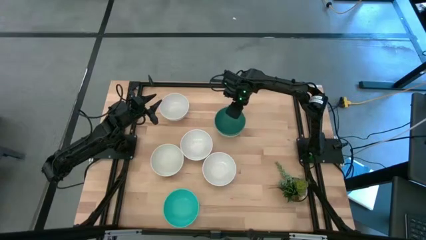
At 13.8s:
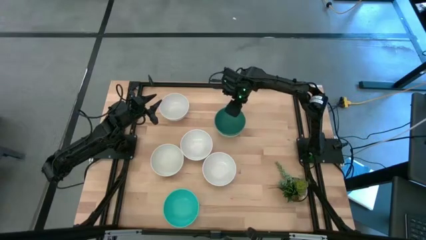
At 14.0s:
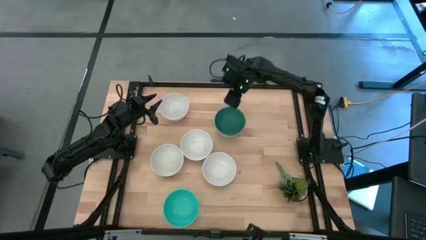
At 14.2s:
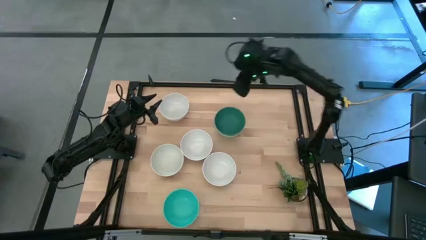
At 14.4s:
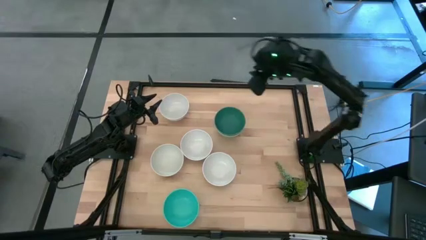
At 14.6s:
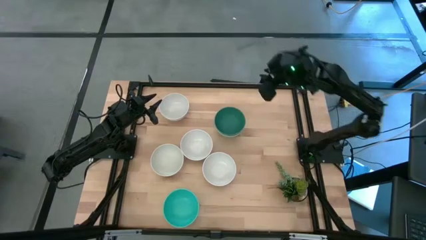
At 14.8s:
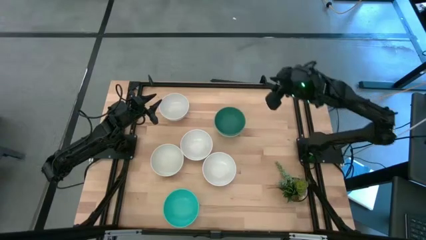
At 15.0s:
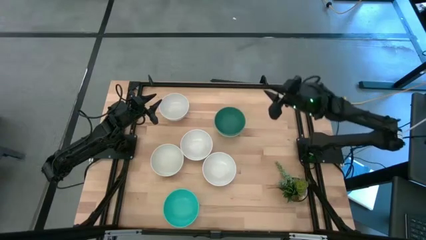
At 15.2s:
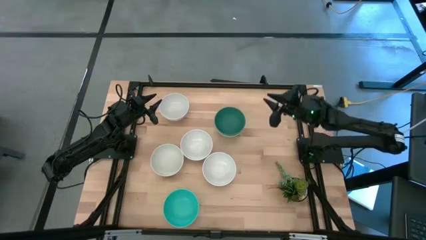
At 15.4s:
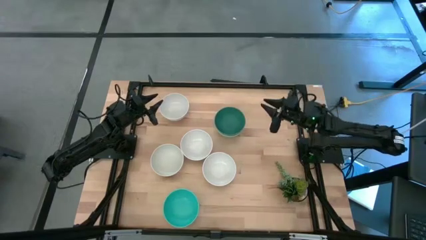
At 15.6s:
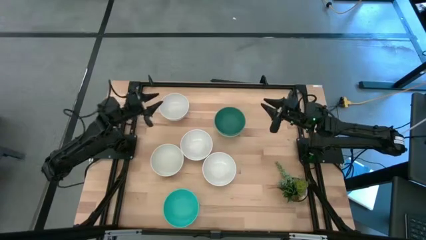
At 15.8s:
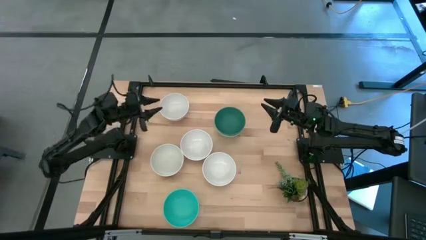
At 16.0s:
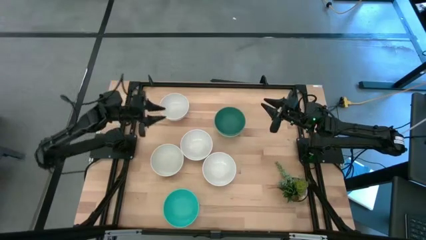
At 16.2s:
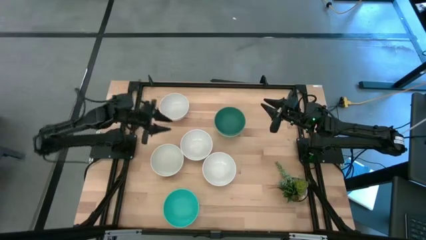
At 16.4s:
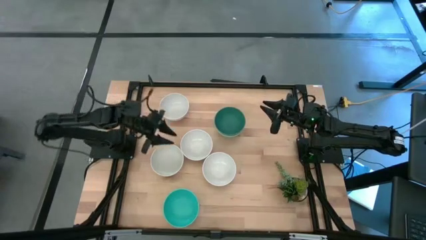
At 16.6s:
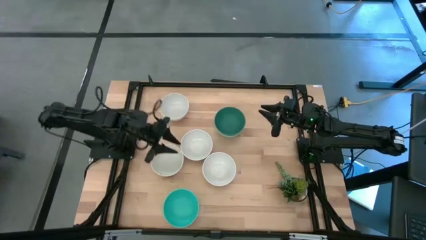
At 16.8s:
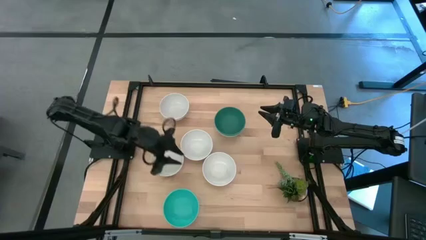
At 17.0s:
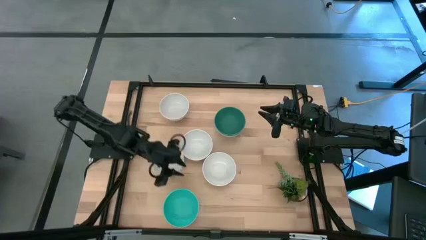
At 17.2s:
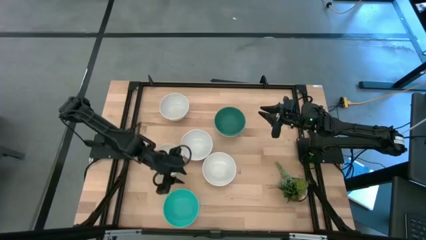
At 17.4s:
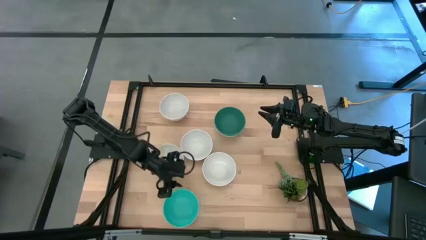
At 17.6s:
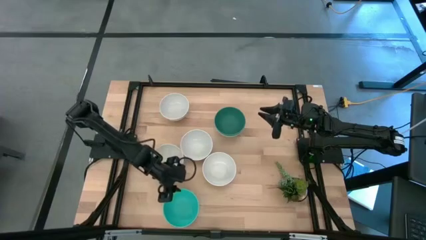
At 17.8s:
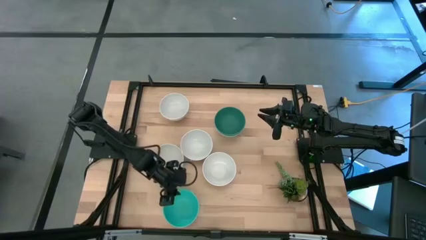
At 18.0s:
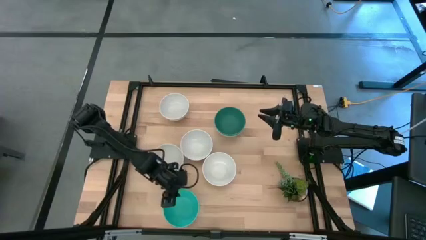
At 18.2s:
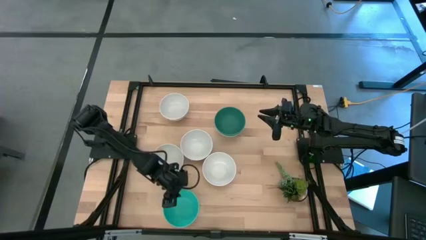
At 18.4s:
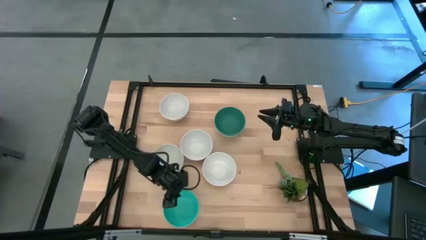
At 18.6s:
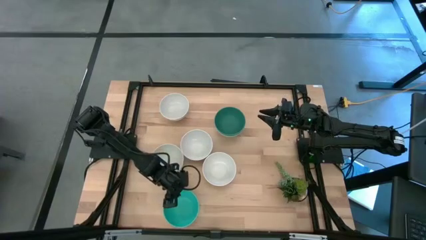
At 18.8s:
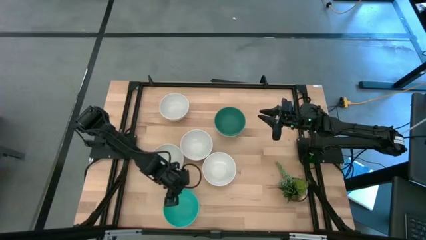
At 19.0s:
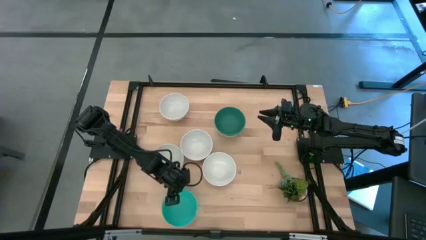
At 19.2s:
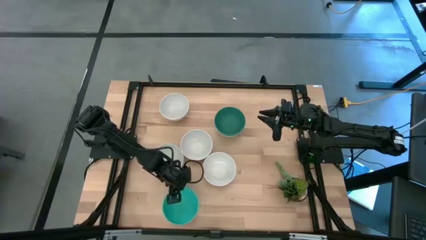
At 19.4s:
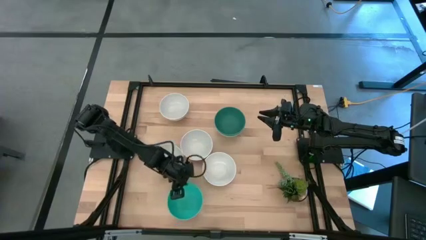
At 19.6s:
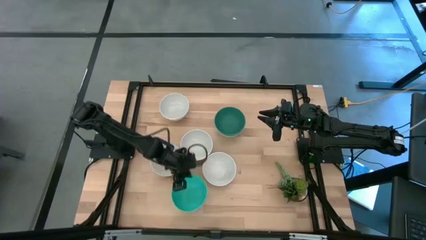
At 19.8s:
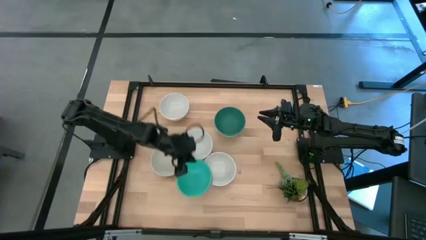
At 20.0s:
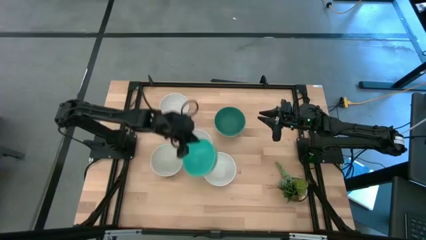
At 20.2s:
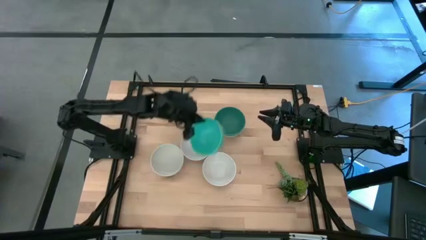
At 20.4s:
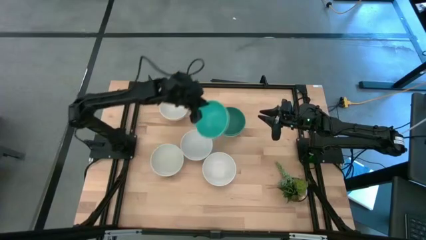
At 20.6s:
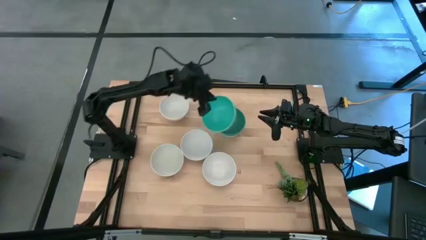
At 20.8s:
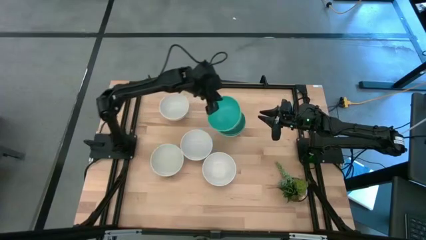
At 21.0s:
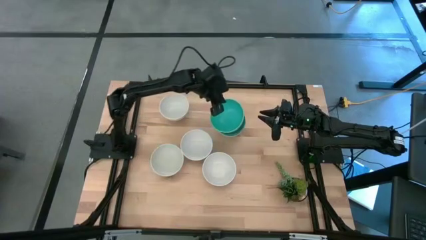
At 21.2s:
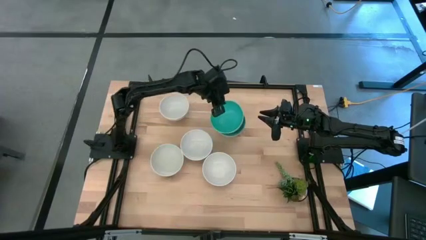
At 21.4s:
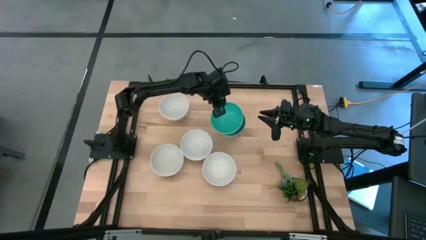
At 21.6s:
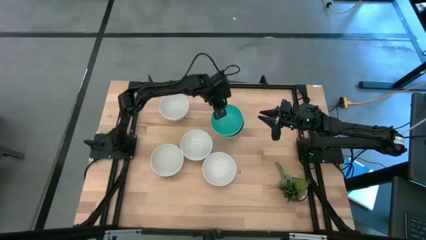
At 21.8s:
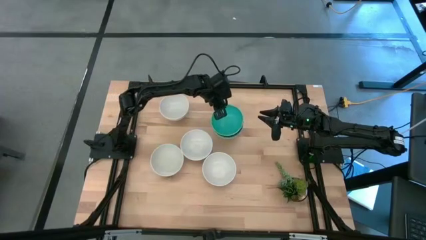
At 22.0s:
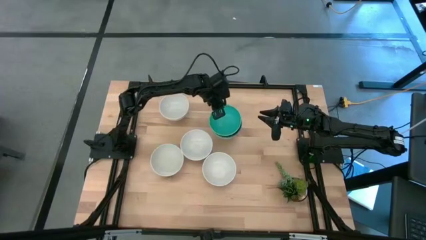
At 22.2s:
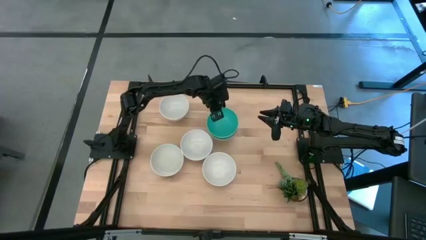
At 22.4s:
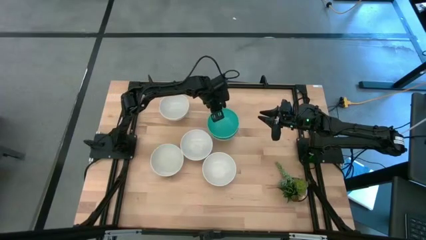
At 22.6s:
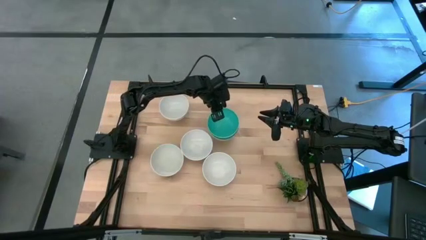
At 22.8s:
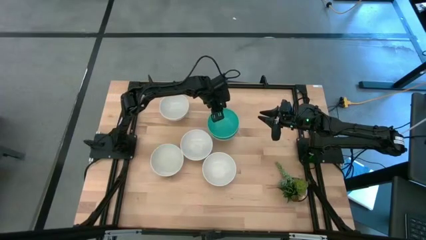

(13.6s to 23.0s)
Task: Nest bowls inside each other
Stack the blue bowl on the dark green bowl

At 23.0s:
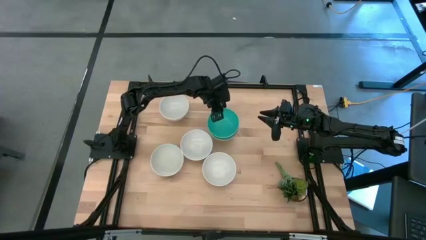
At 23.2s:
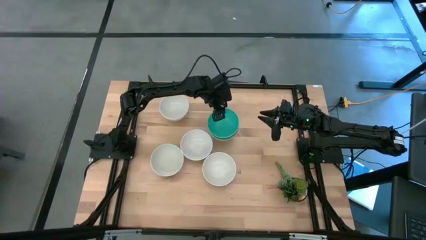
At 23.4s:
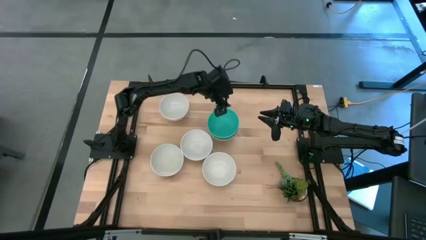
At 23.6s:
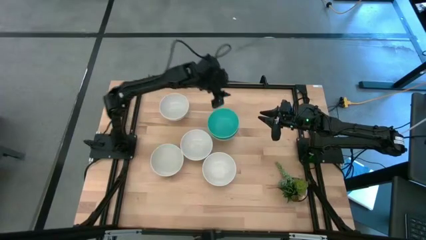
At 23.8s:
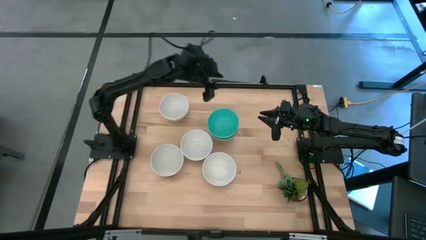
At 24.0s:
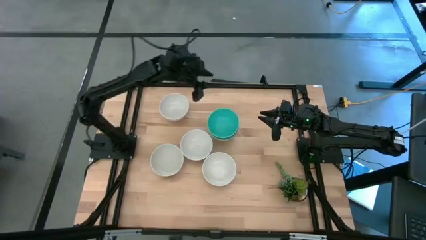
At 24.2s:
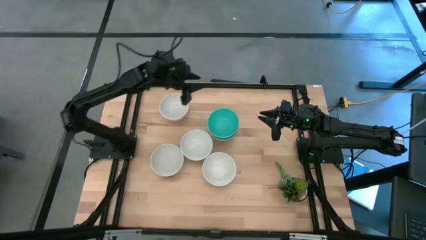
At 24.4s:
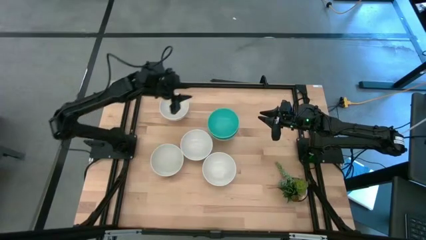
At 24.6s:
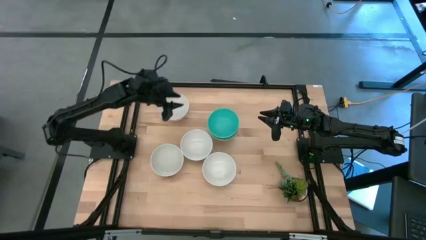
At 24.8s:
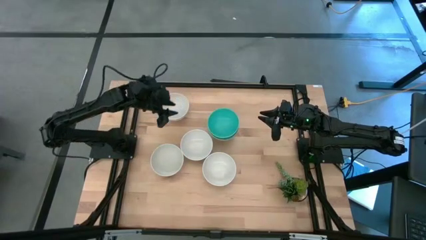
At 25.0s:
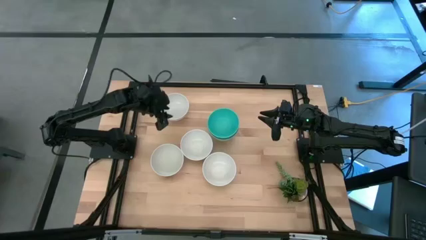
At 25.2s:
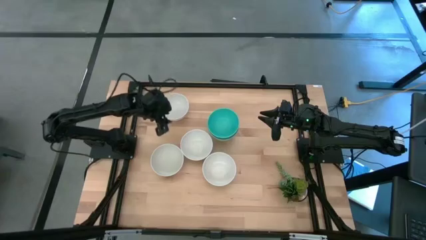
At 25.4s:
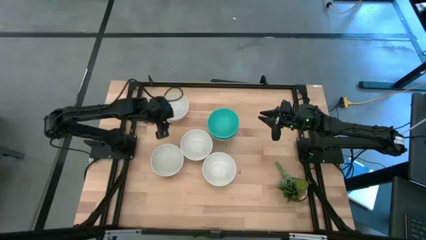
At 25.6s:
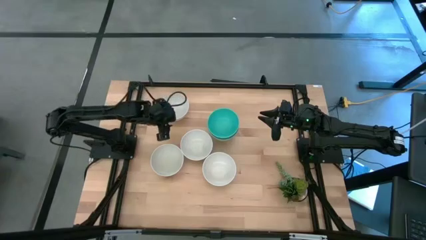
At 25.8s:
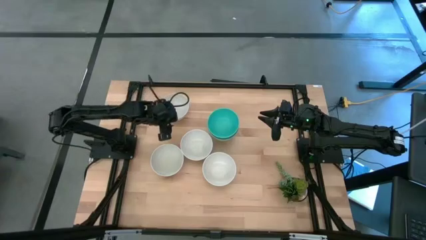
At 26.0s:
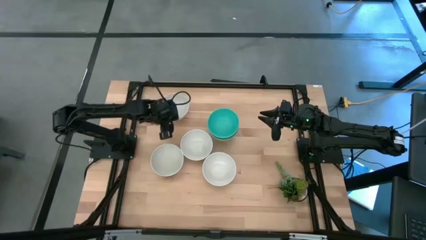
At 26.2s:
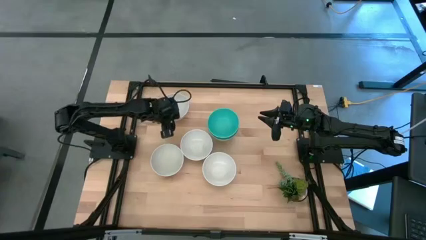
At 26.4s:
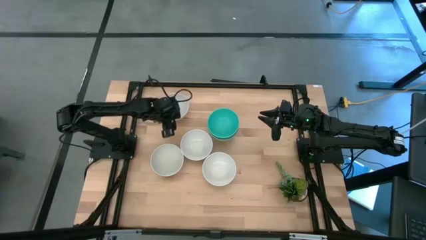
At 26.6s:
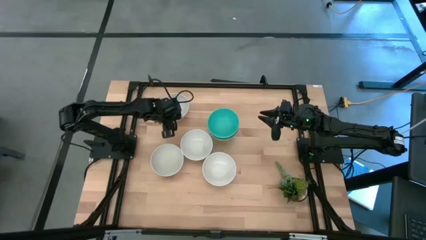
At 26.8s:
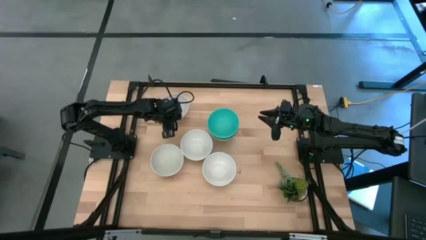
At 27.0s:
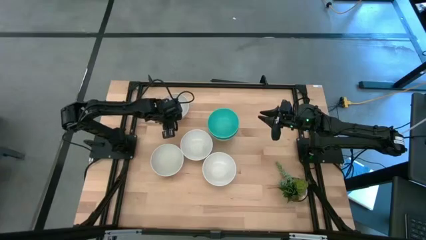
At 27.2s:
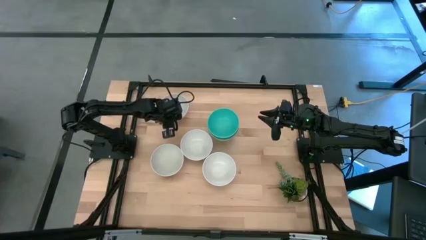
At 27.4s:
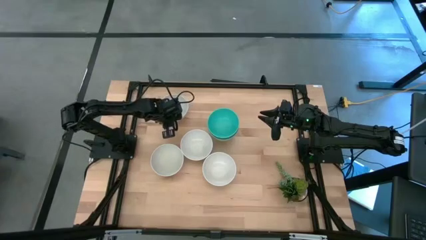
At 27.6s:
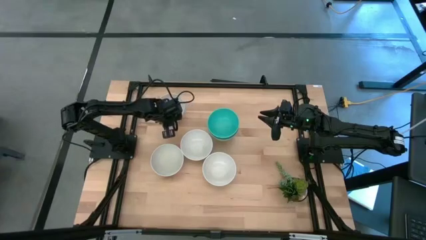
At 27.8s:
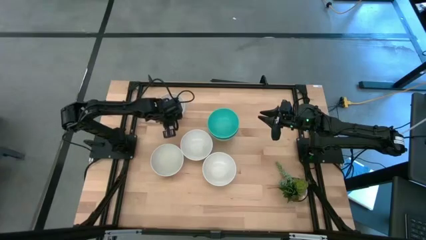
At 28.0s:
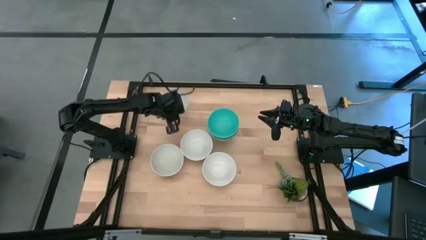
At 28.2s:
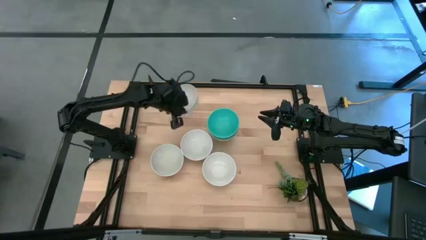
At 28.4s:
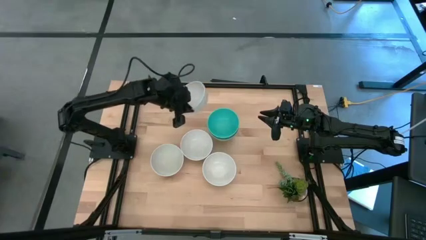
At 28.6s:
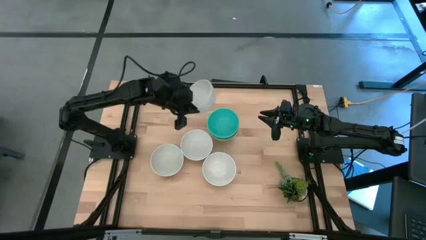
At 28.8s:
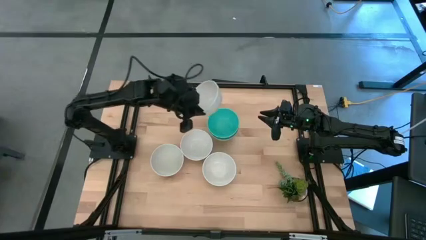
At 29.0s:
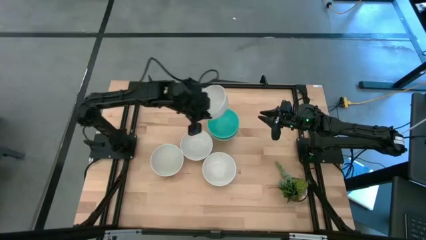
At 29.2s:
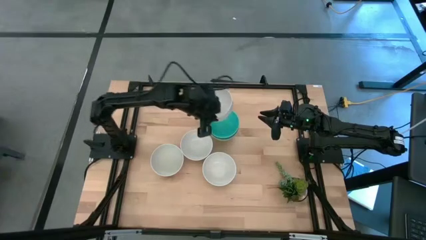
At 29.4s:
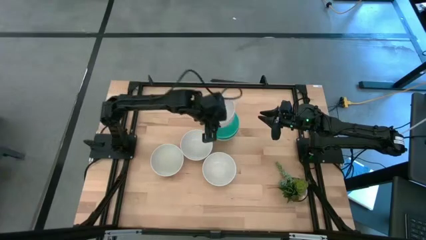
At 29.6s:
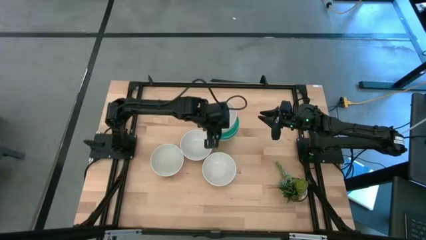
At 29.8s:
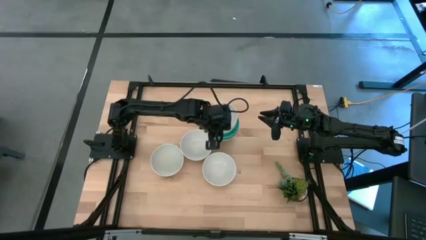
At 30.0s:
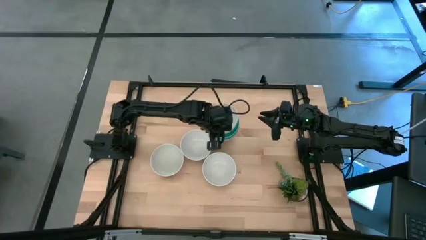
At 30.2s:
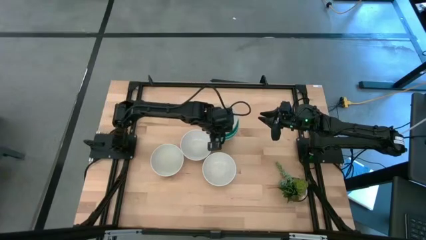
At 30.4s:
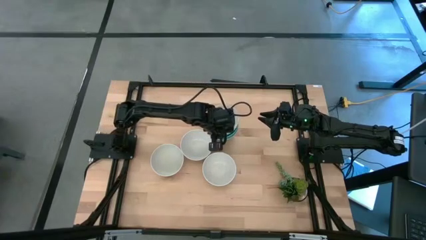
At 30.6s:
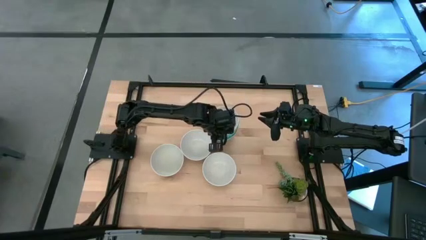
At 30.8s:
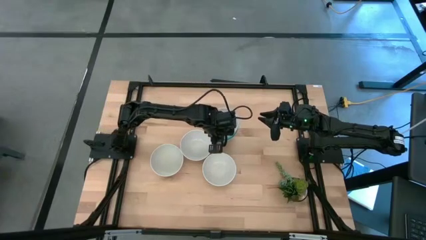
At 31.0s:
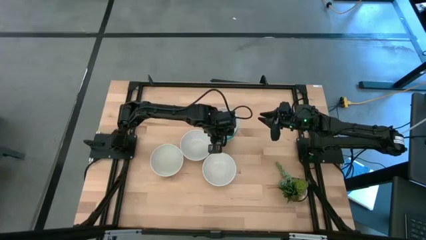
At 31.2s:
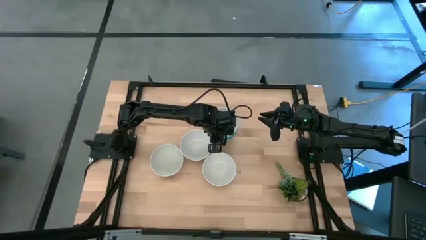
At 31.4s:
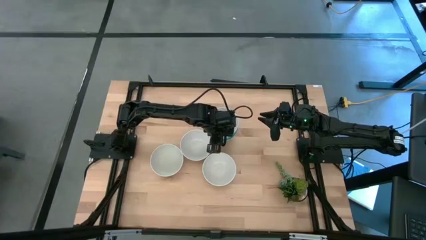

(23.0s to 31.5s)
Stack the white bowl on the green bowl
